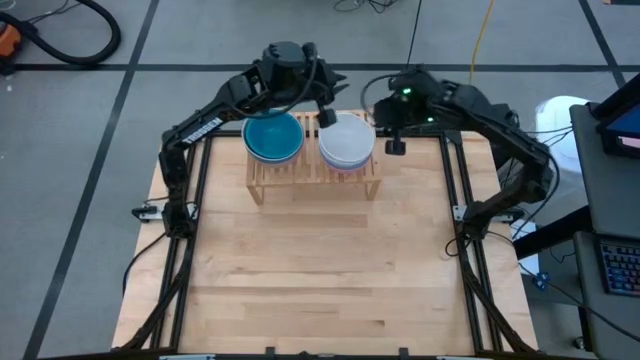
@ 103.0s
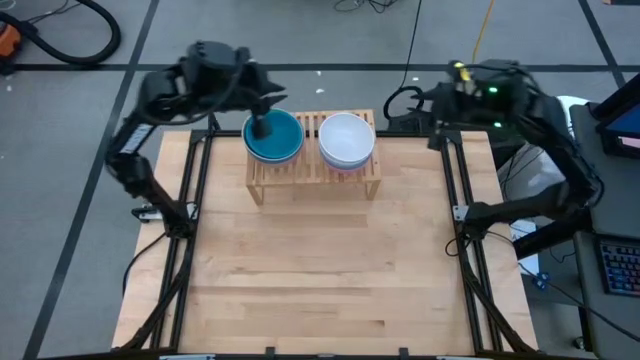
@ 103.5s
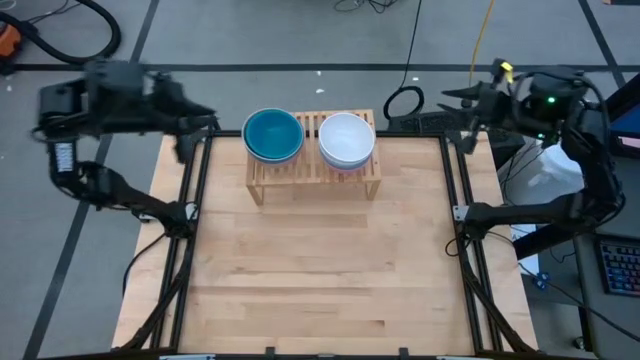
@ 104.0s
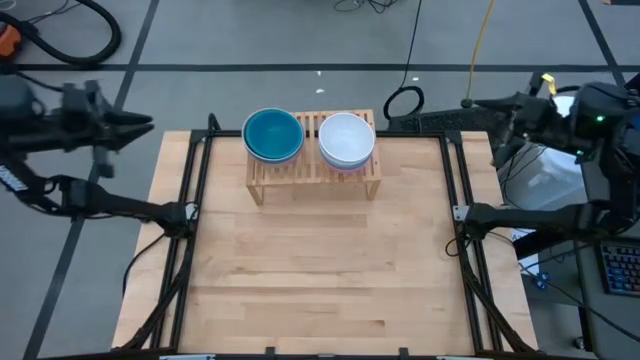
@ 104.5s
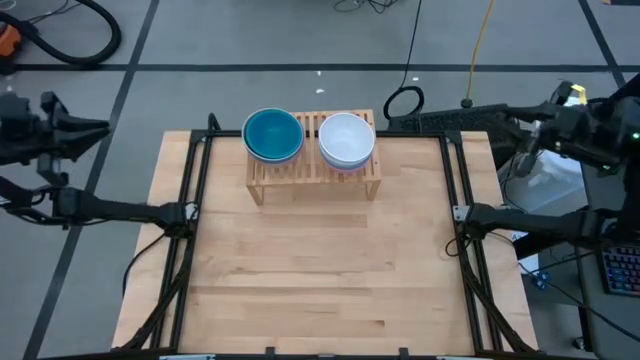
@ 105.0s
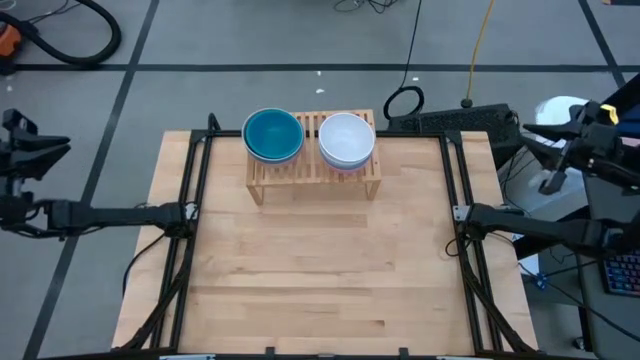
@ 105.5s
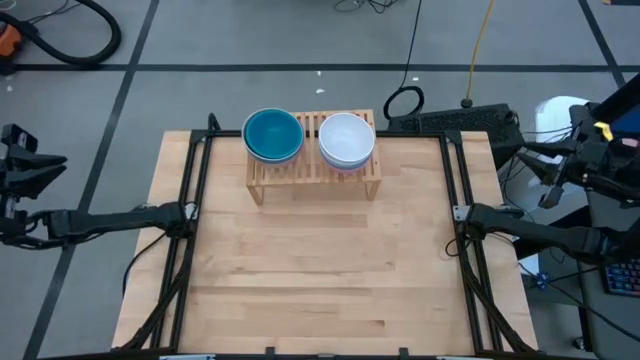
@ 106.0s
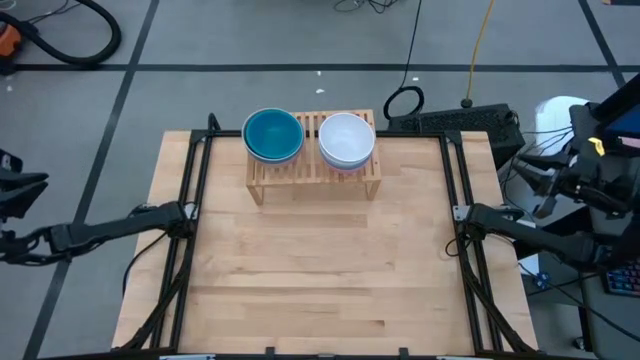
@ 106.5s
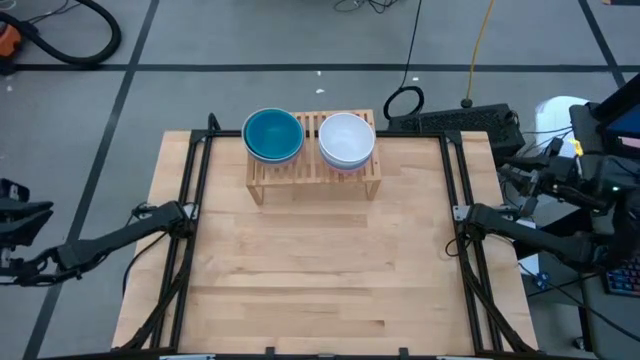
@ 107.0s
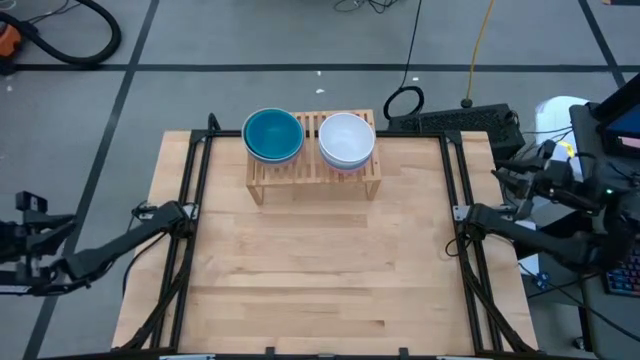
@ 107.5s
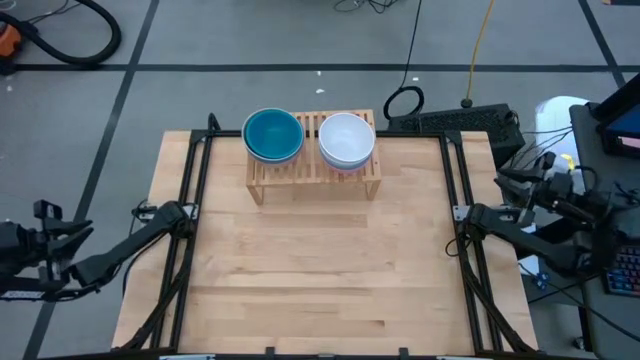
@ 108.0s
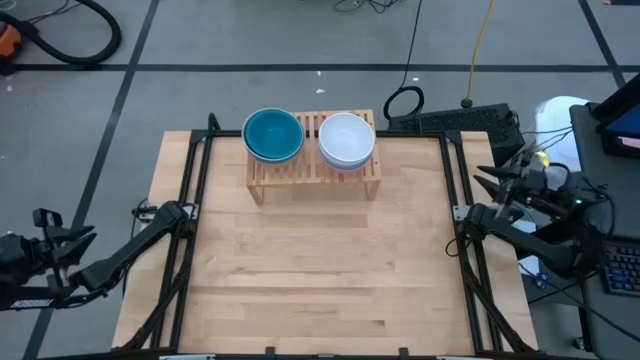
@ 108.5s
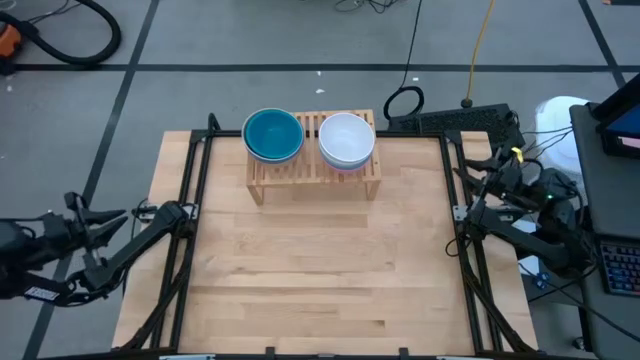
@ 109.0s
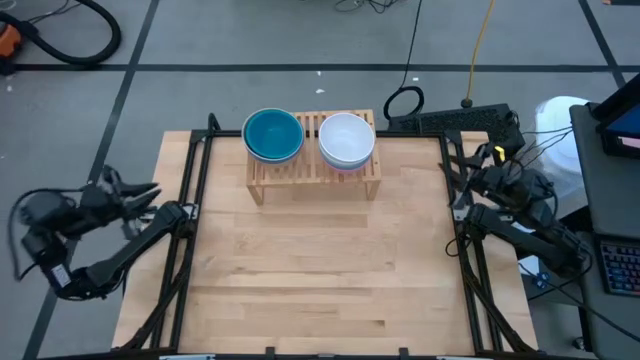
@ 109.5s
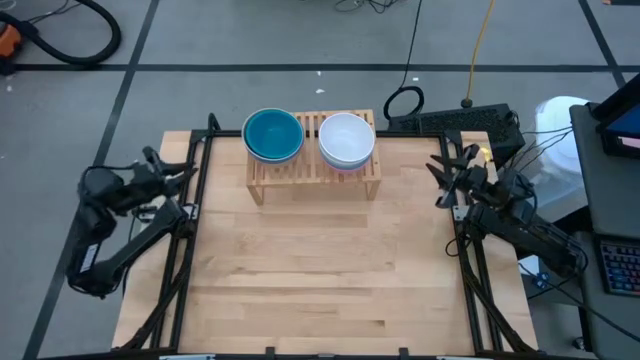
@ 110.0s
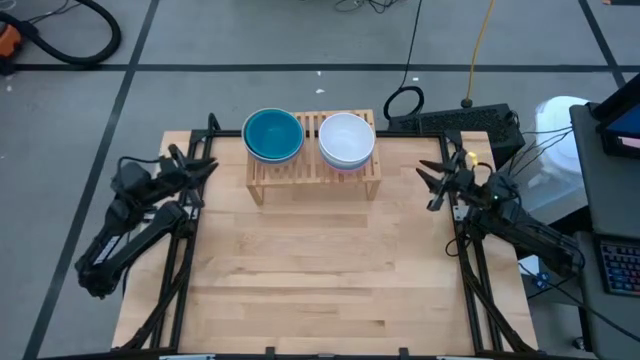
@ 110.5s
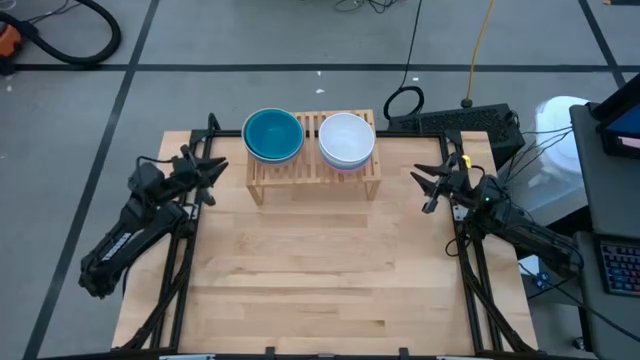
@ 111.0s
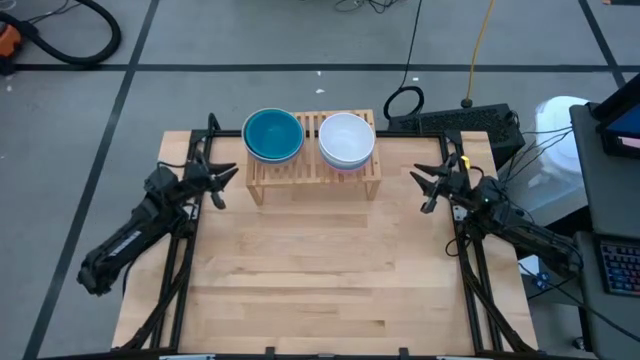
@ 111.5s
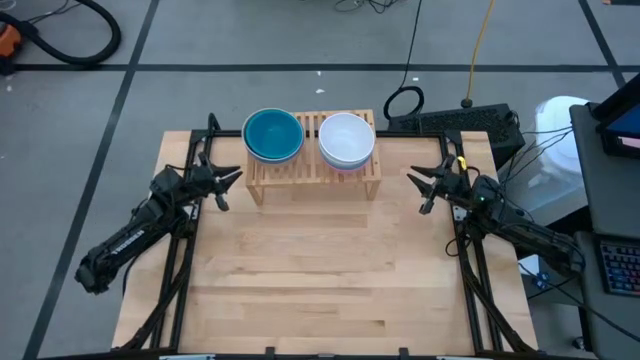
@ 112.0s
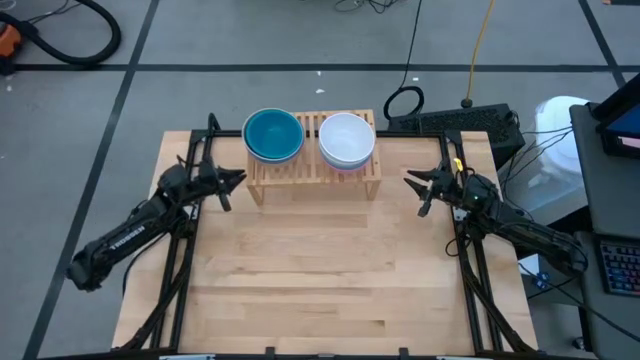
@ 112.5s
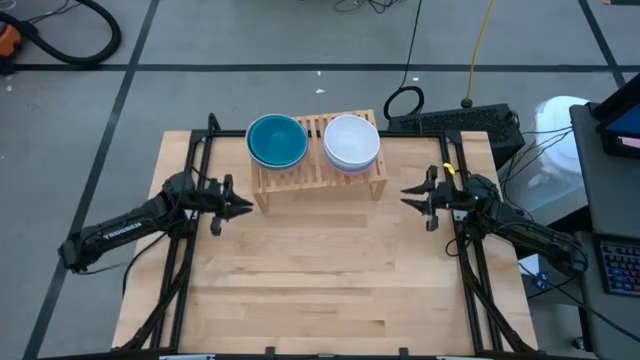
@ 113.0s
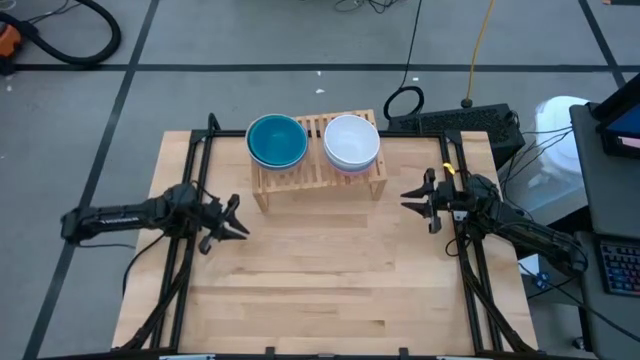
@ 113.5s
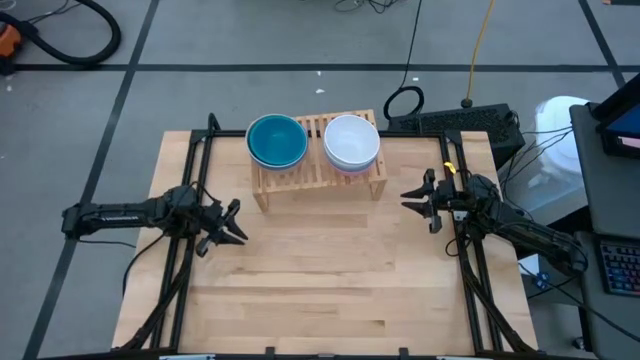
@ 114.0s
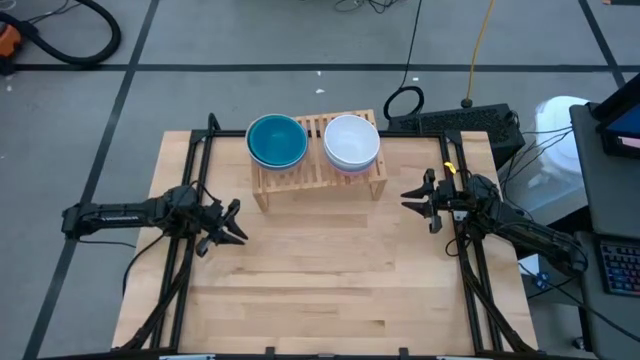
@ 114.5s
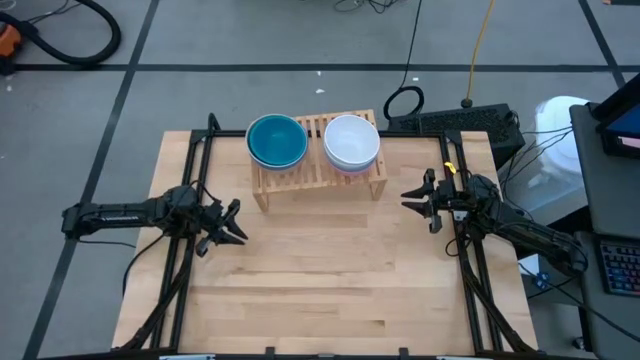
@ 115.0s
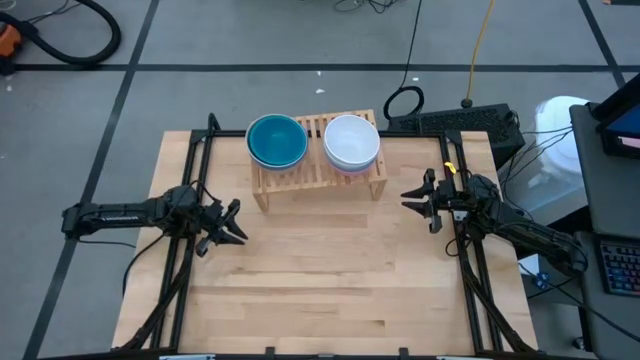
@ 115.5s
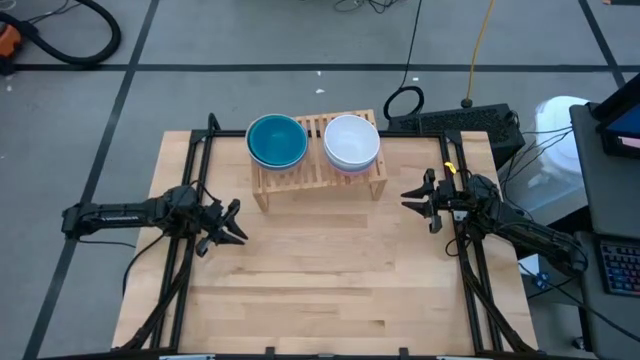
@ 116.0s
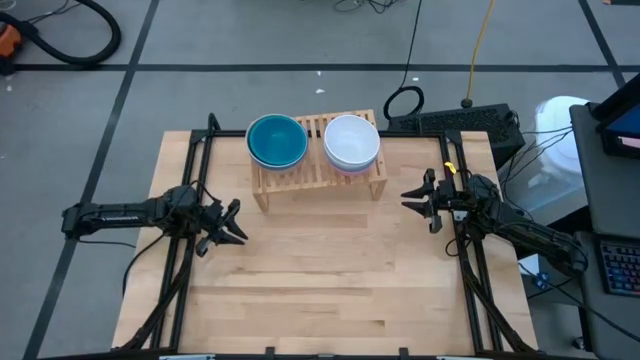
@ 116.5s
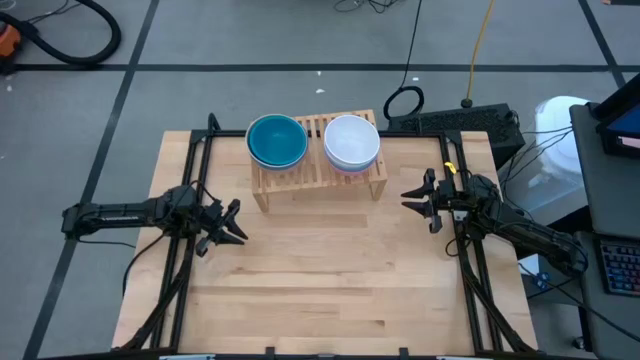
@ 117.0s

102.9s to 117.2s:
Task: Place and stack bowls onto a shelf
Return to Home Position

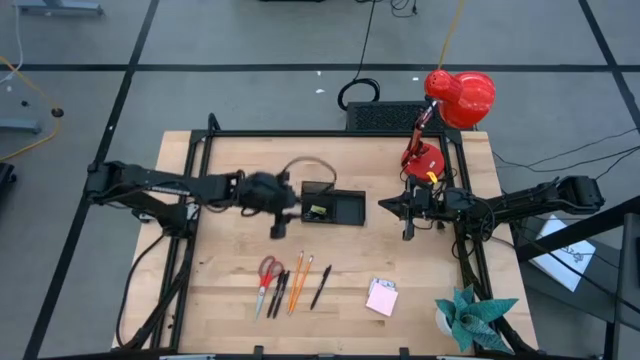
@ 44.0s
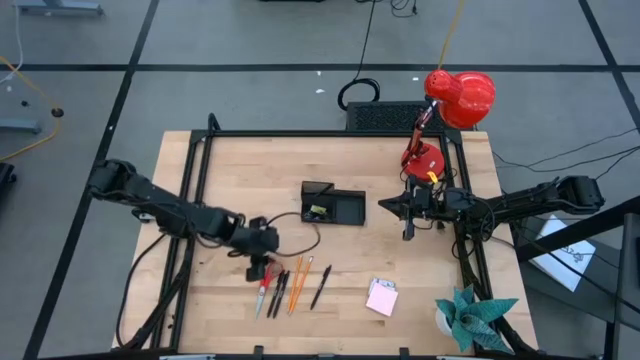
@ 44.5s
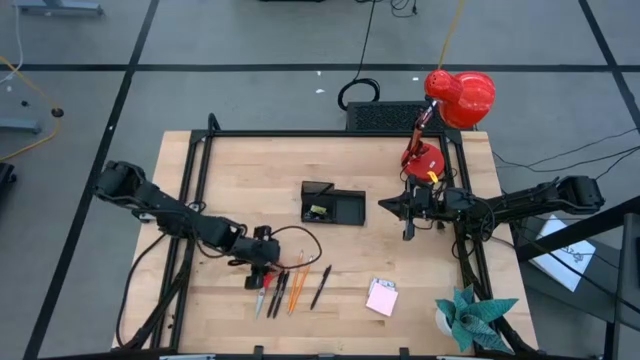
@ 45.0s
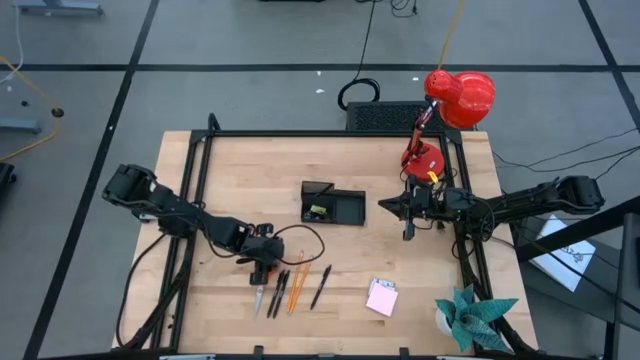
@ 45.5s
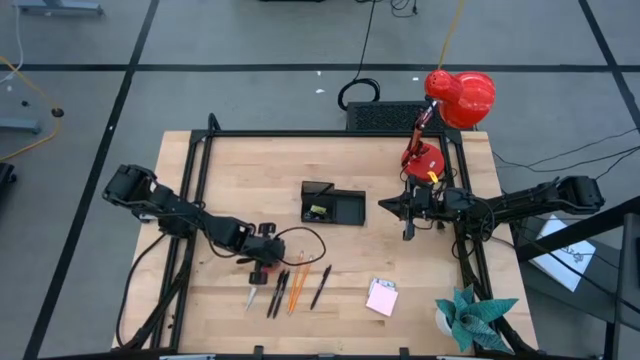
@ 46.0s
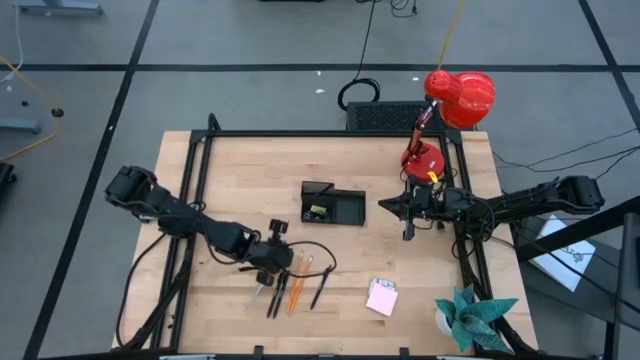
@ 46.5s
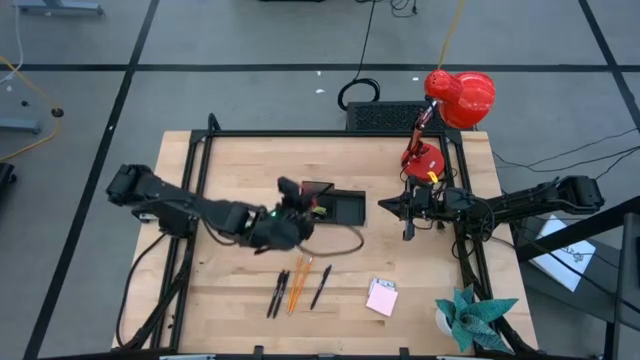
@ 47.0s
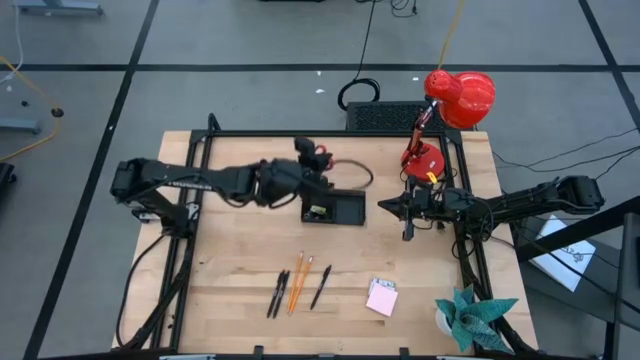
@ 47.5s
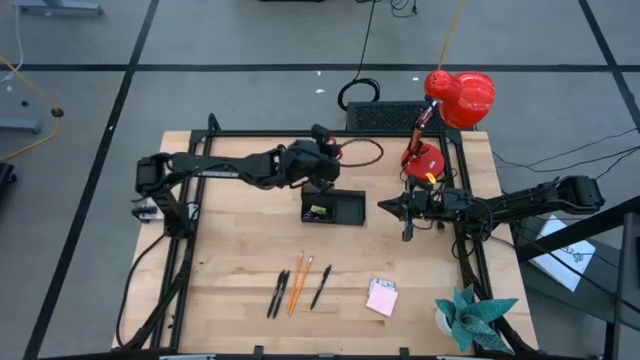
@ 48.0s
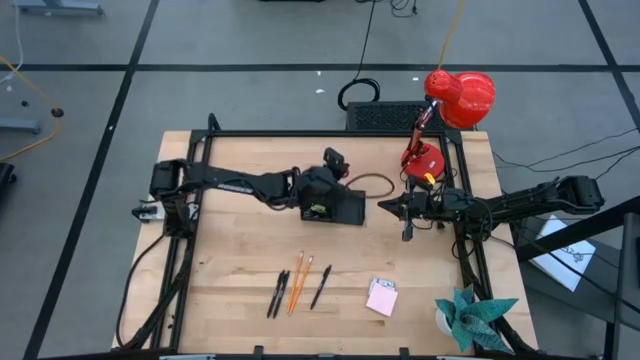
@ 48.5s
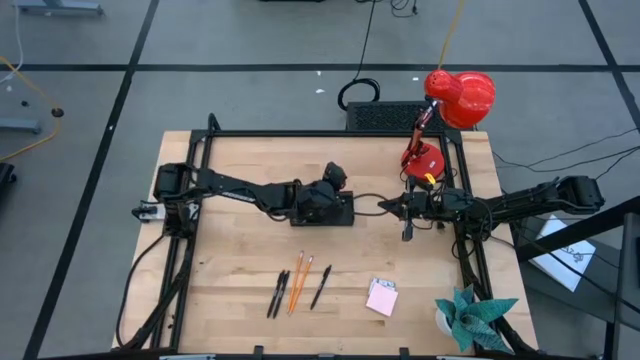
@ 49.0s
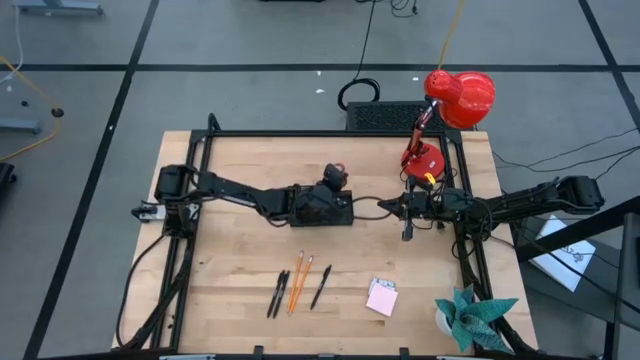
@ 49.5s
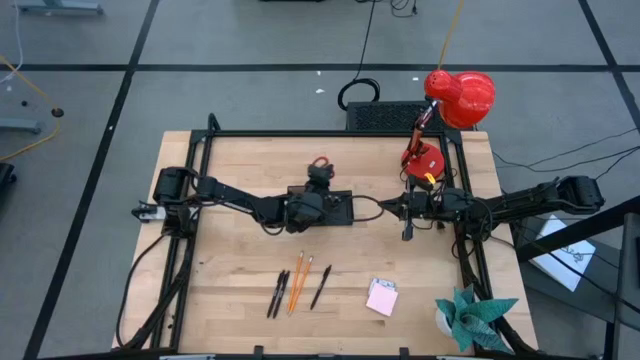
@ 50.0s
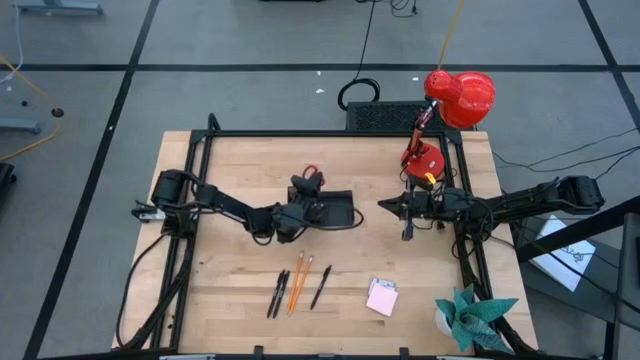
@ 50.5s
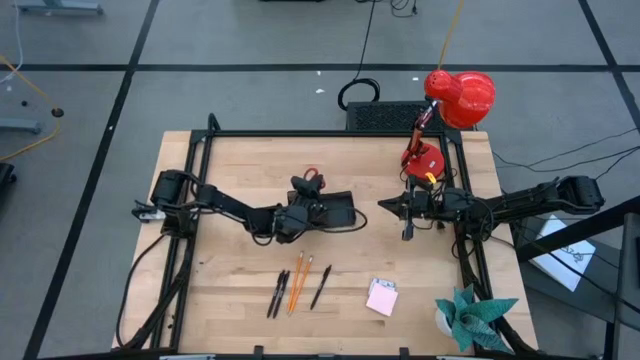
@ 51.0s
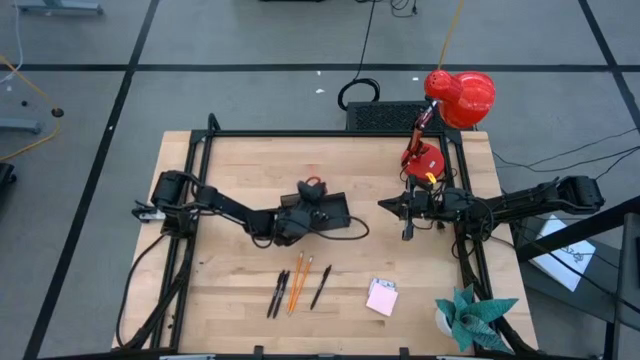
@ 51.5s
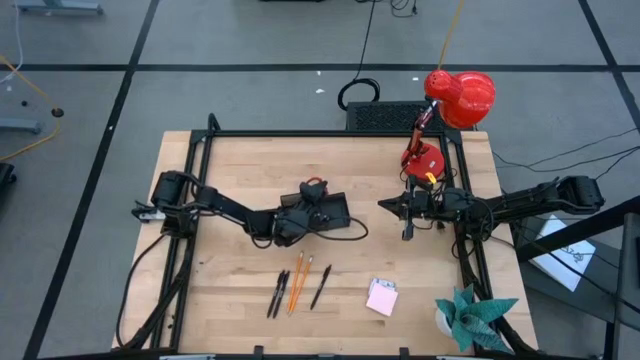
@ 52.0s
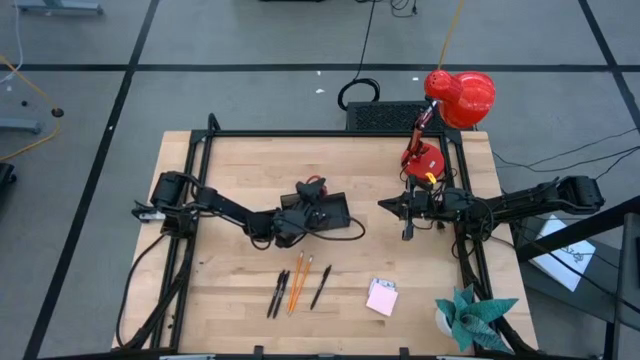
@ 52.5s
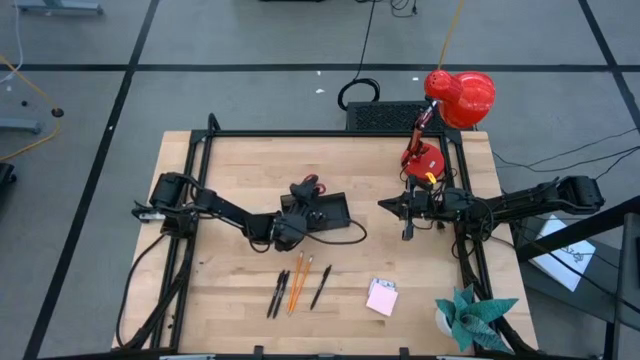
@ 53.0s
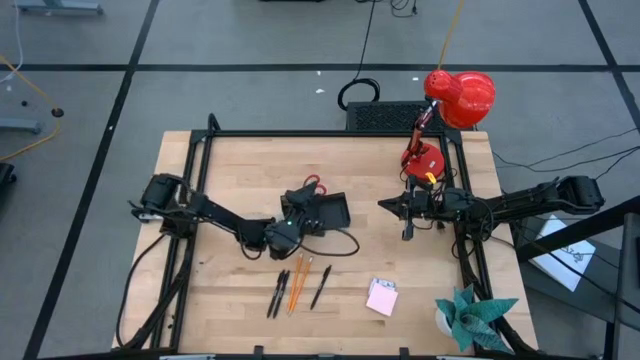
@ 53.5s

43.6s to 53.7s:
Task: Pick and place office supplies into organizer
Put the red scissors into the desk organizer
